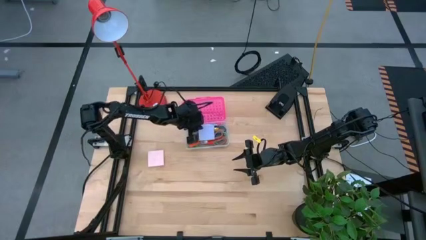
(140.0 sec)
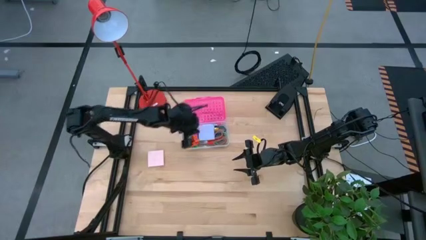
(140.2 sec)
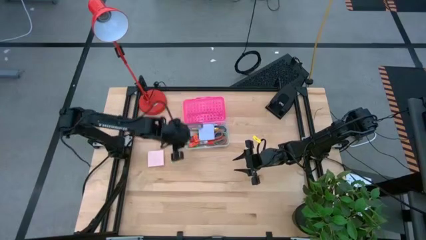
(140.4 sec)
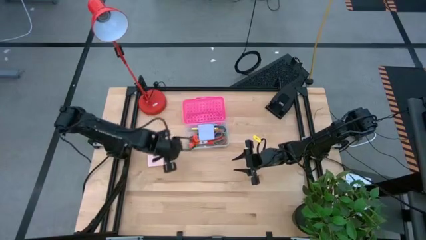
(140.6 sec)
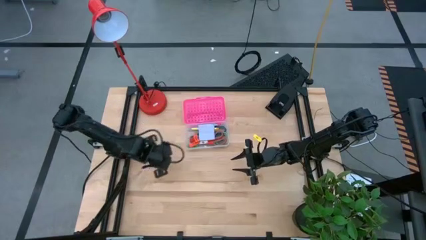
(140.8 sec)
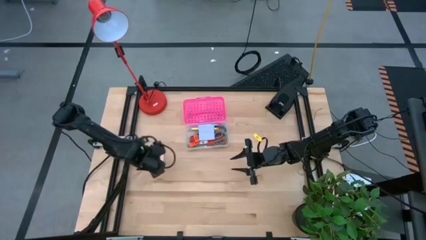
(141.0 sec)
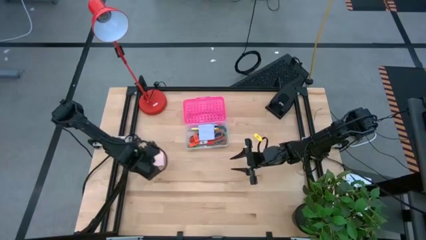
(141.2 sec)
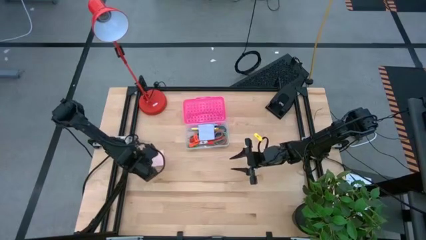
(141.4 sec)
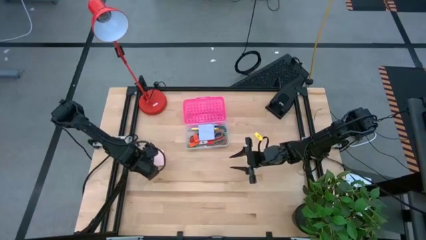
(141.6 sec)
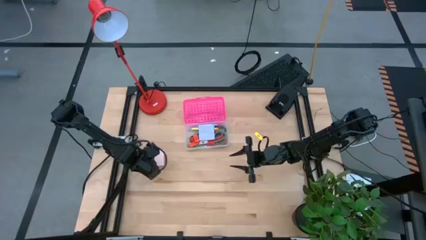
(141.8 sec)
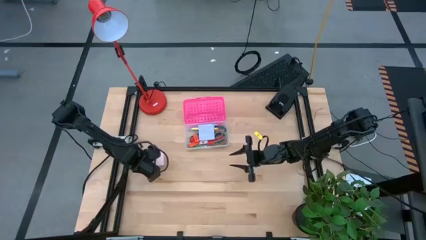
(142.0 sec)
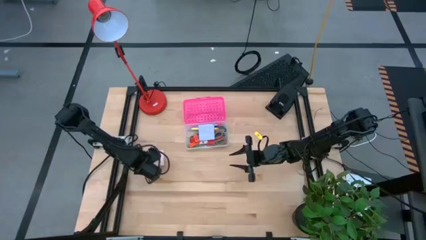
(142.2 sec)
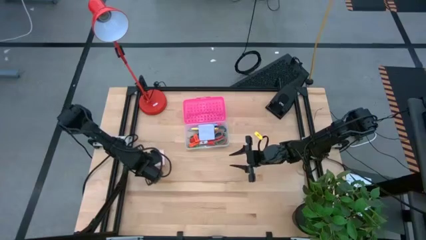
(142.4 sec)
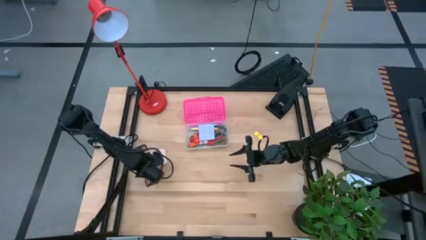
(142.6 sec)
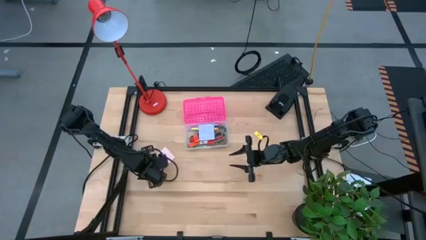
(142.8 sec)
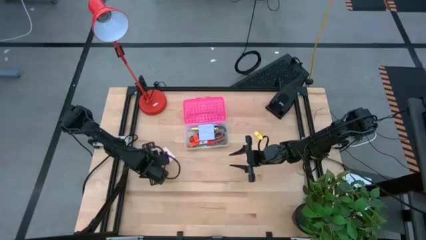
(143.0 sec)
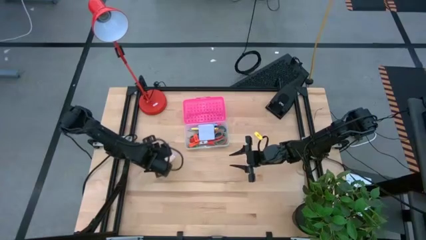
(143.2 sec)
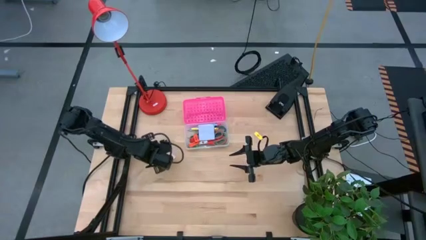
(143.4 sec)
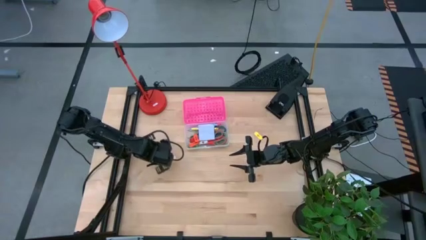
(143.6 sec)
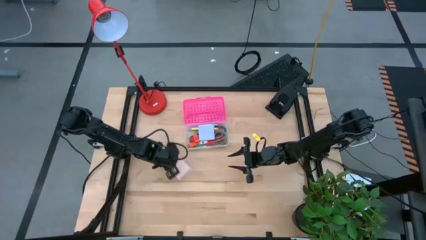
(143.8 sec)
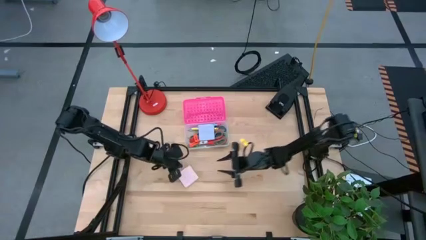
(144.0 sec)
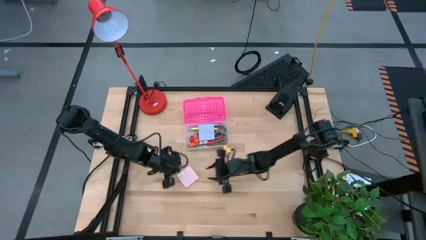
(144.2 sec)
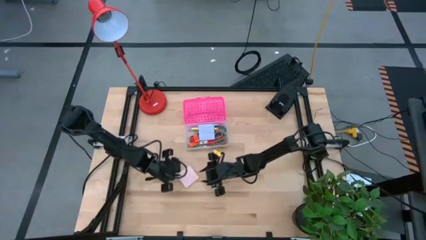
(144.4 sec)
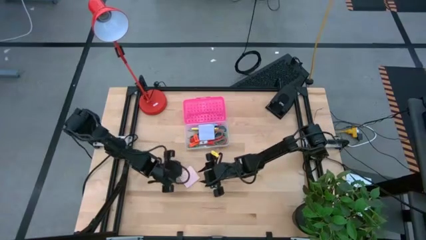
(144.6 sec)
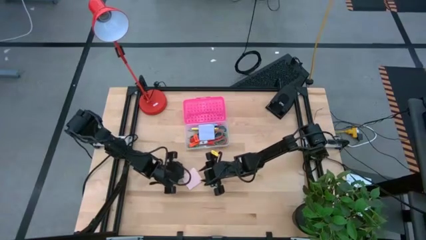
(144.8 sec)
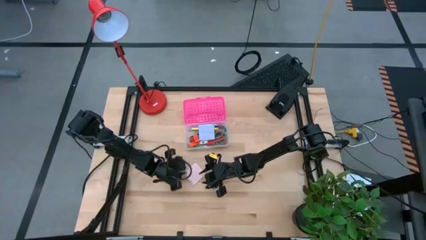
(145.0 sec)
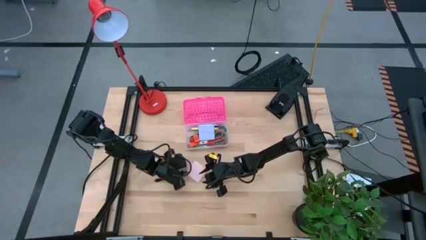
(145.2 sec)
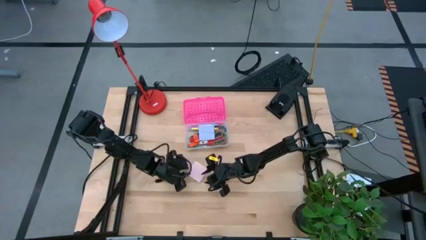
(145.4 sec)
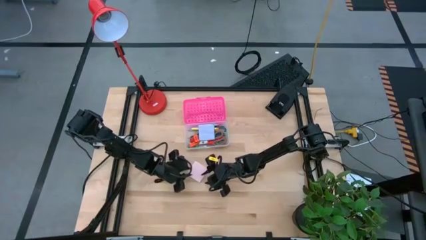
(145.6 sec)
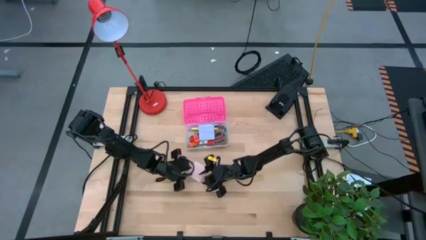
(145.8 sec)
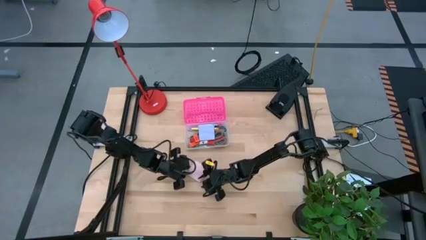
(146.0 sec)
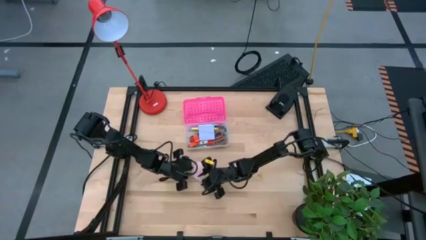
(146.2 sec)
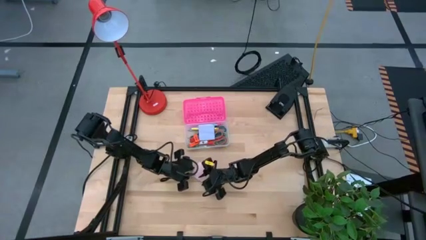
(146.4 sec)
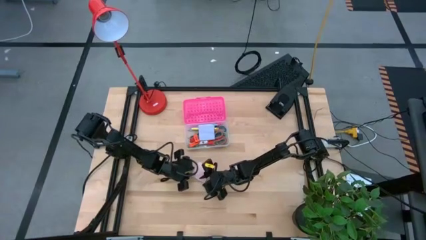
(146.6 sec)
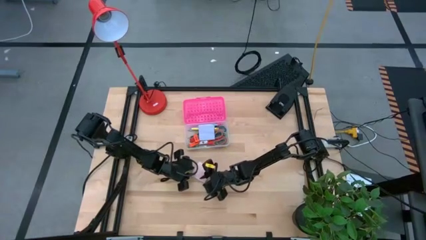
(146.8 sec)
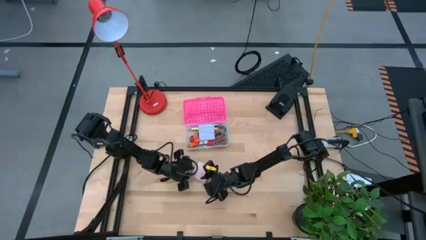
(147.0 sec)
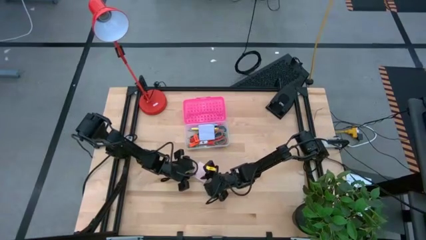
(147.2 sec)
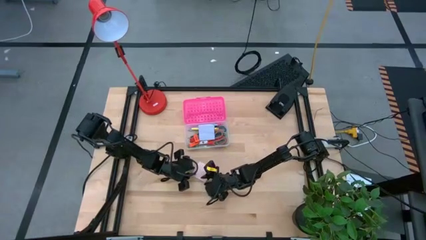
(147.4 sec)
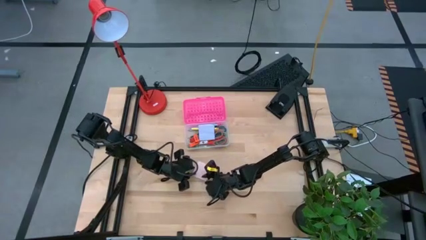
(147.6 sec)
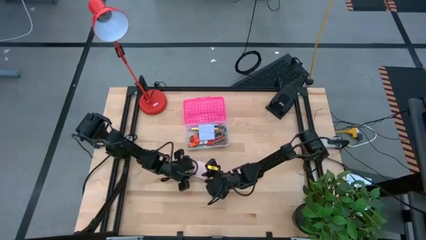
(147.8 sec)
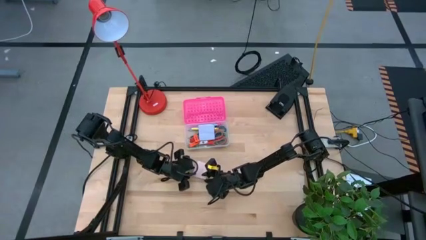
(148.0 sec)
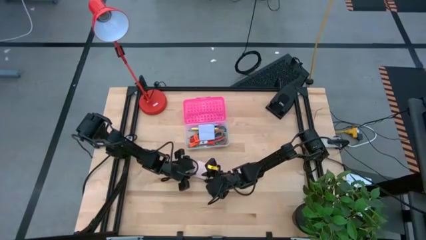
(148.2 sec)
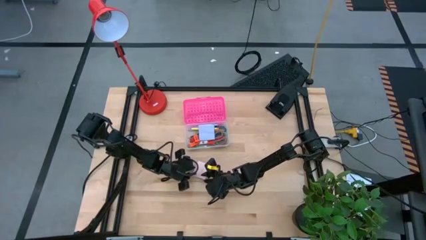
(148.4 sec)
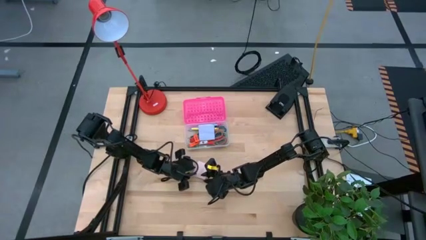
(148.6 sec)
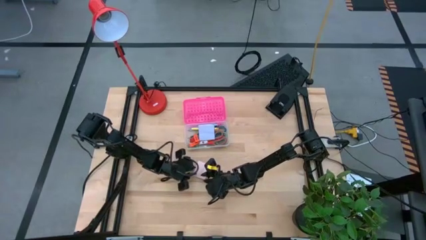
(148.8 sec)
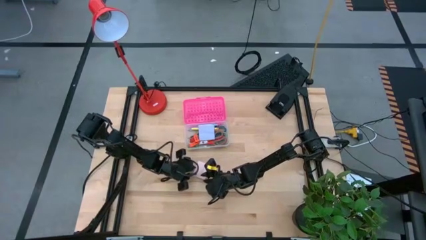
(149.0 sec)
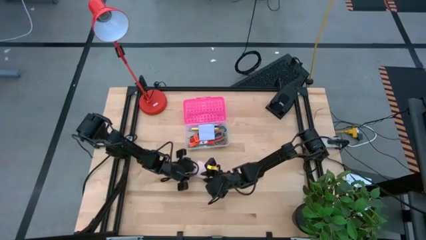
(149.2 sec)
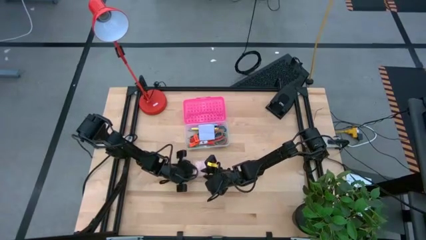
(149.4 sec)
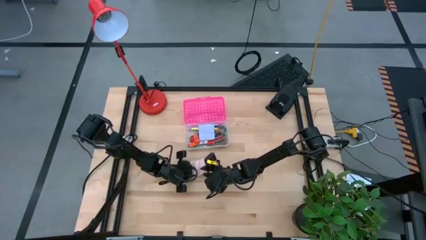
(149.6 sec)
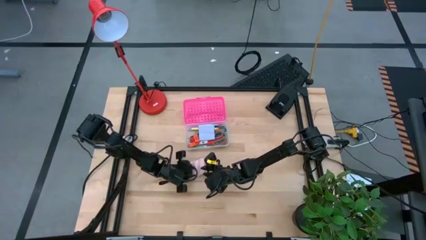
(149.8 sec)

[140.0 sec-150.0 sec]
Task: Pack school essentials
Put the light pink sticky note into the pink supply box
